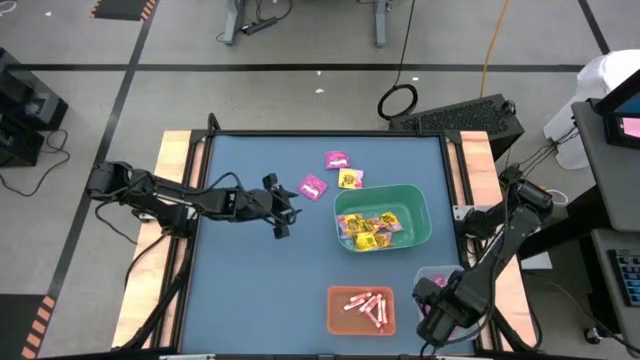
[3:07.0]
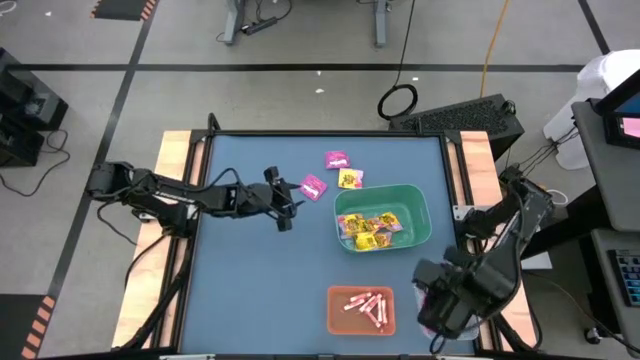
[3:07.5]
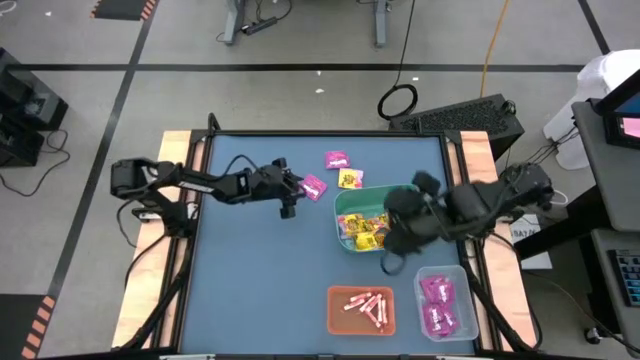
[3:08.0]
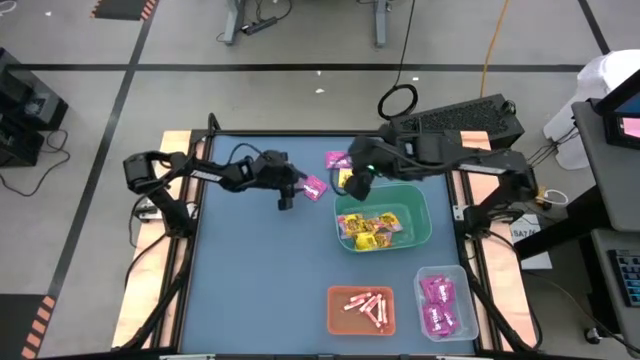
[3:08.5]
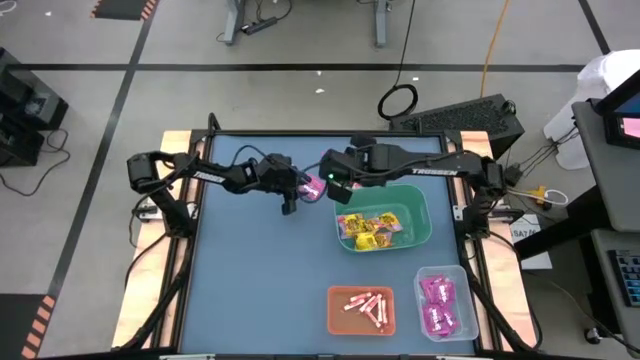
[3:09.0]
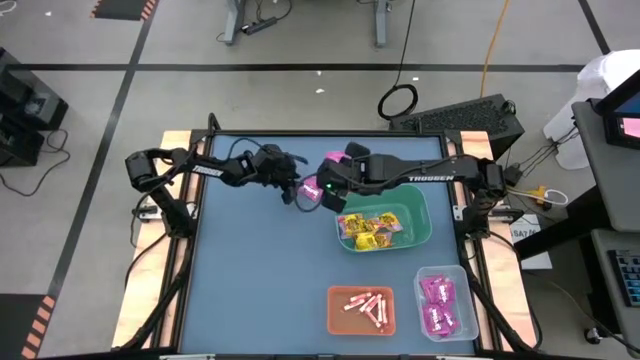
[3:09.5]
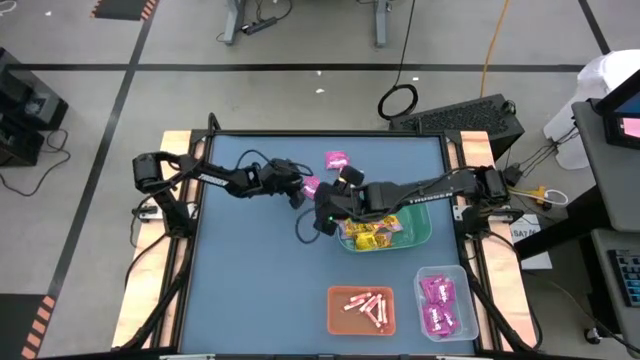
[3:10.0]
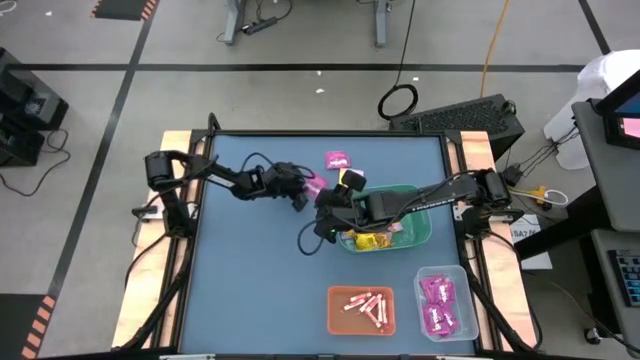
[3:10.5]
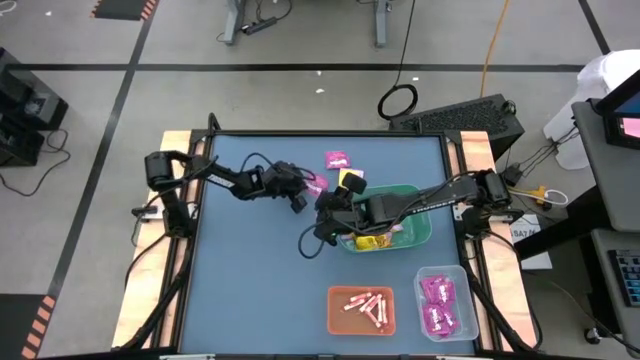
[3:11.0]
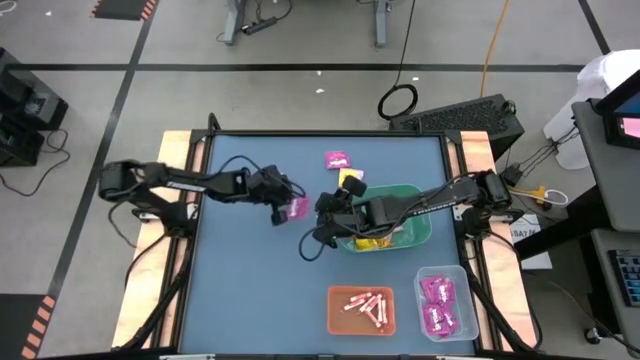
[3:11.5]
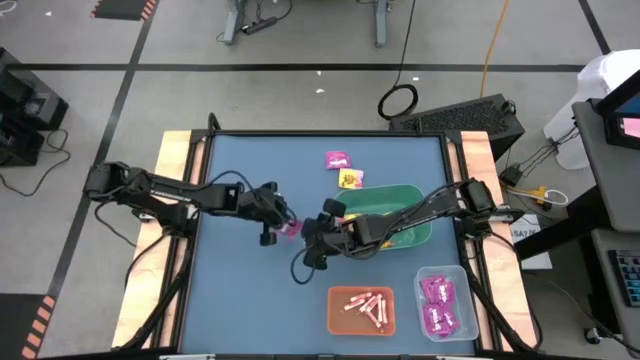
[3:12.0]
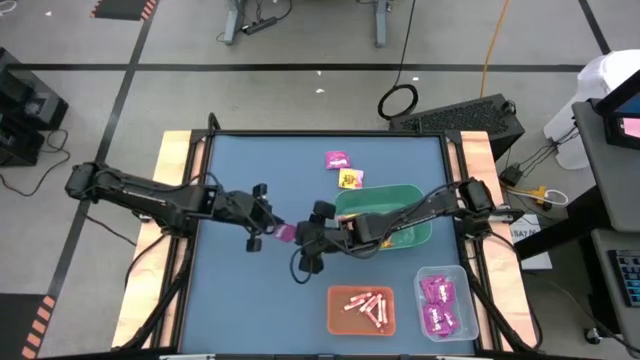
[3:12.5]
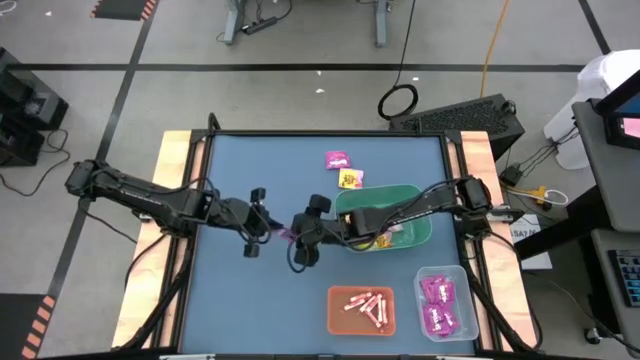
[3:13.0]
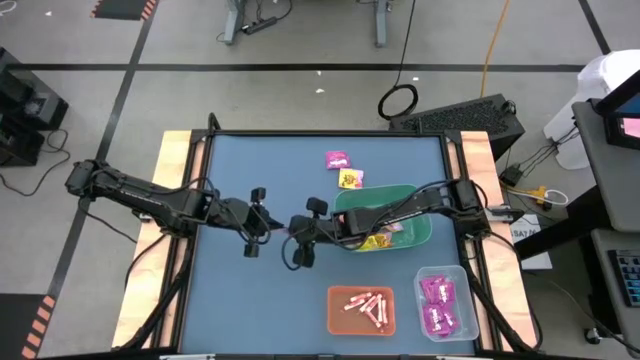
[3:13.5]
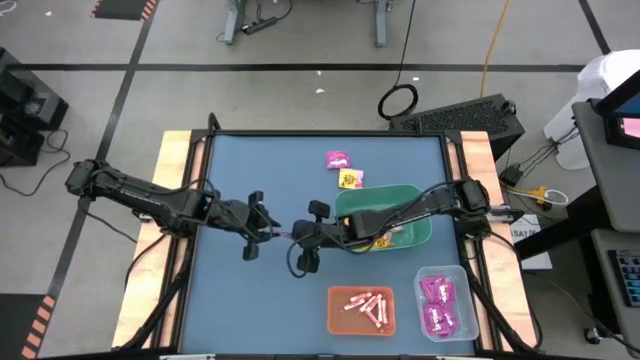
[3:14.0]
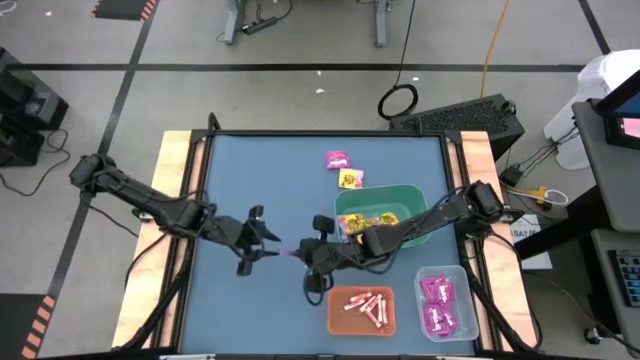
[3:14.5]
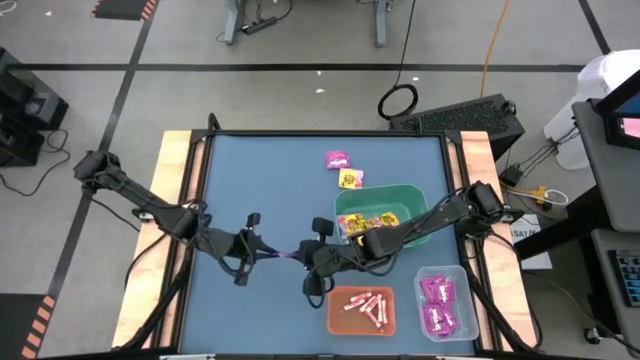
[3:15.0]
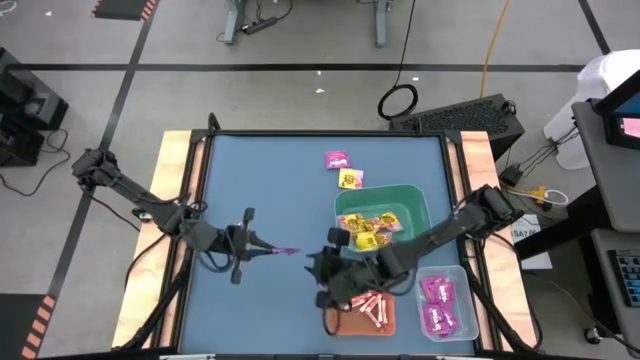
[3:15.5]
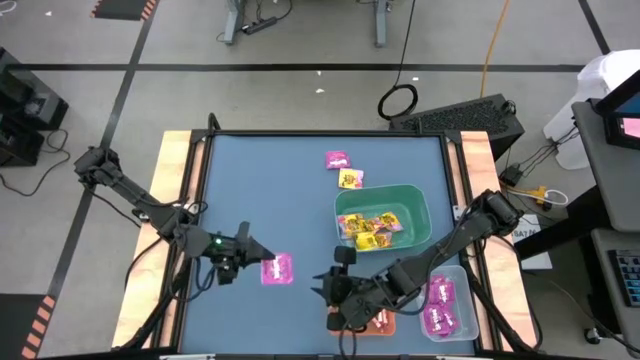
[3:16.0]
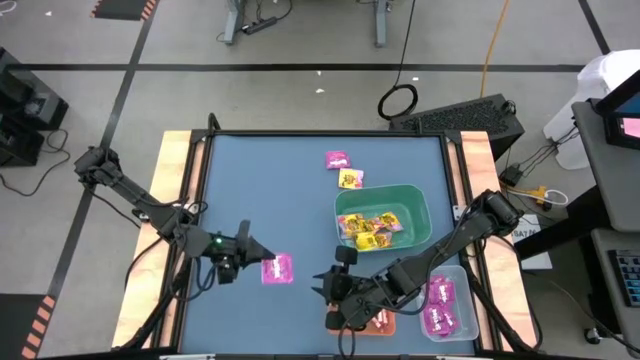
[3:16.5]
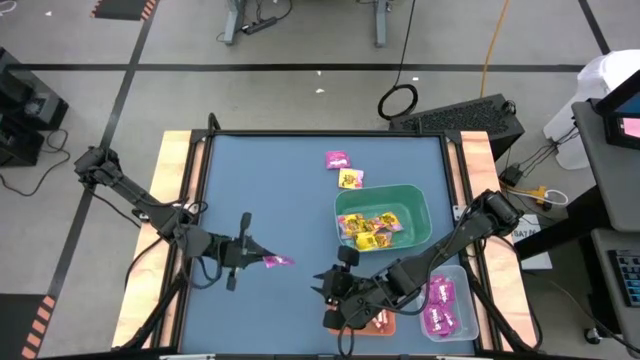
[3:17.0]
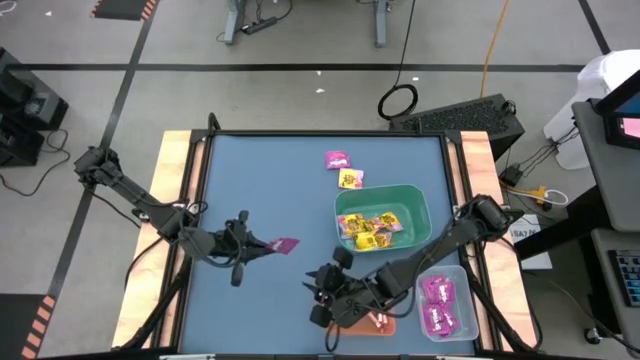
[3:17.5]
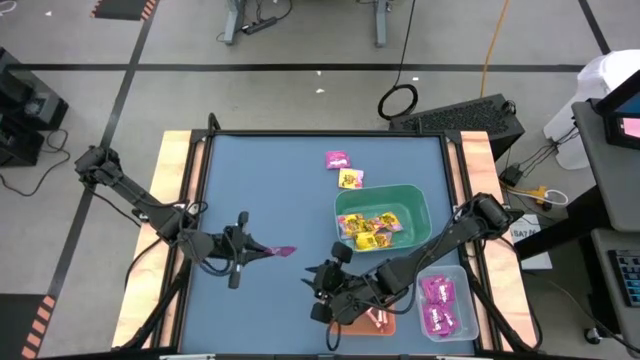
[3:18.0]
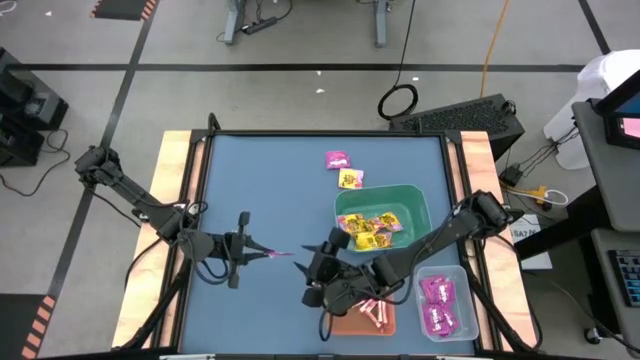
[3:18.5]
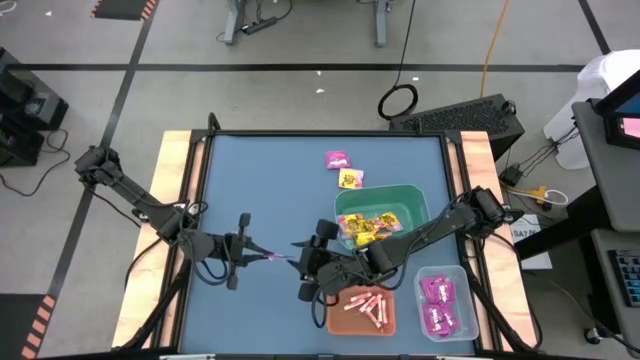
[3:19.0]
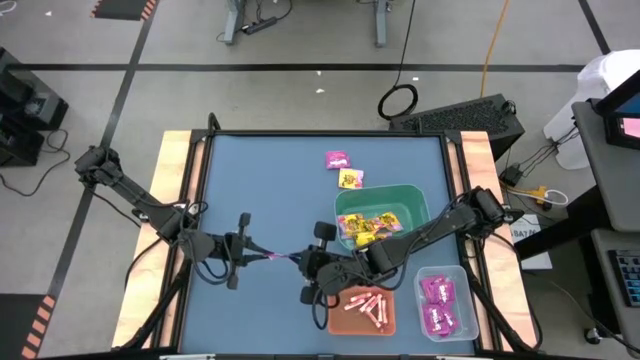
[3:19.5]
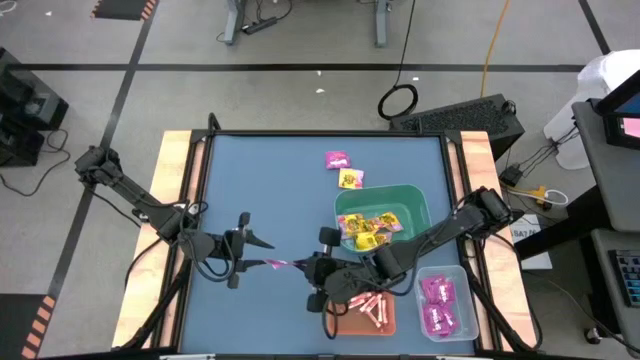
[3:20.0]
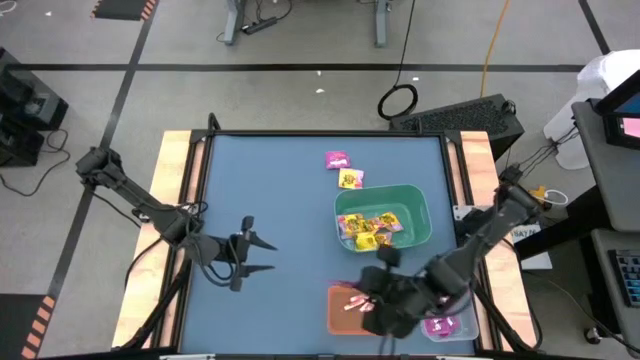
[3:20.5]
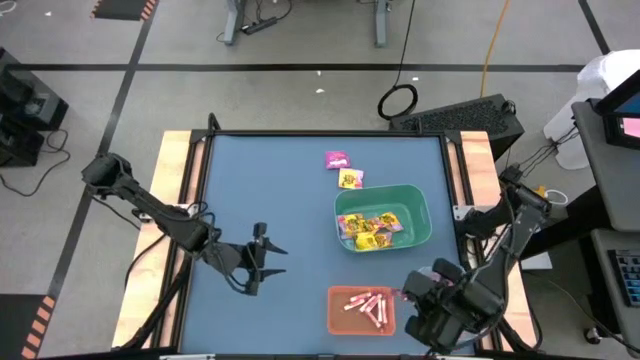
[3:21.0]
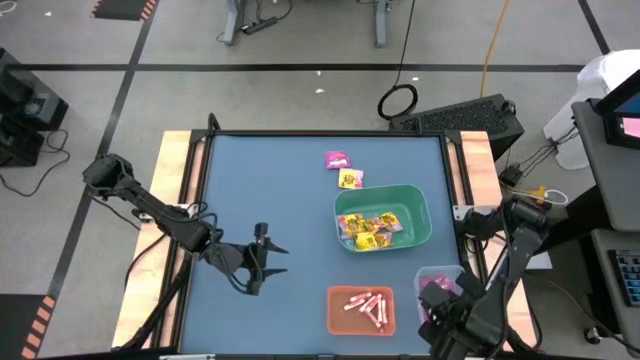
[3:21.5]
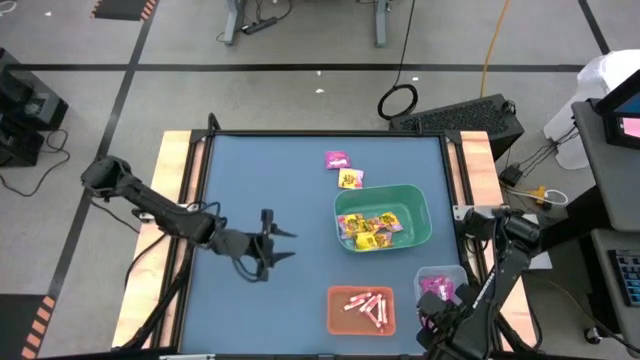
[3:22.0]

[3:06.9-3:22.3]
Task: Sort candy
Put the purple candy pack into the transparent bin

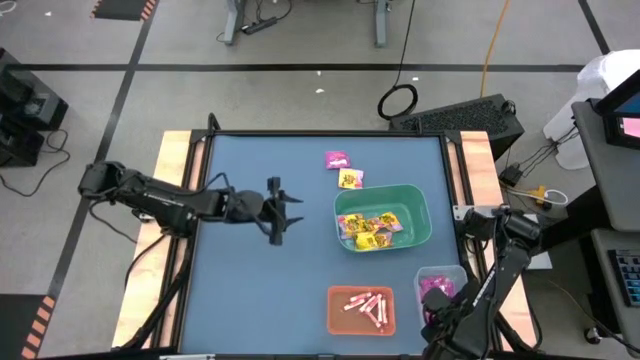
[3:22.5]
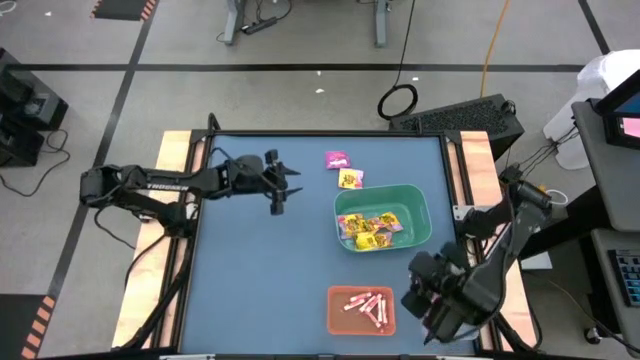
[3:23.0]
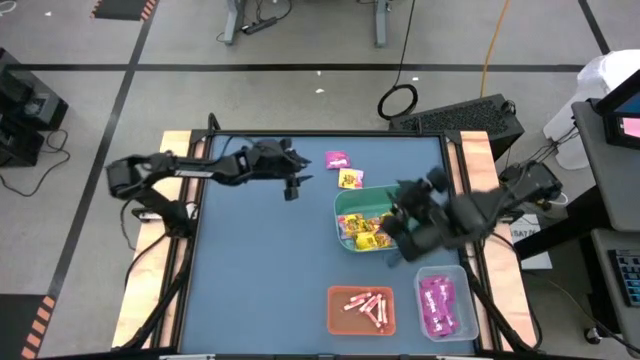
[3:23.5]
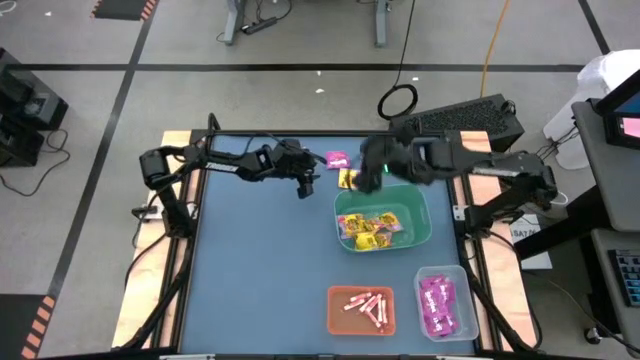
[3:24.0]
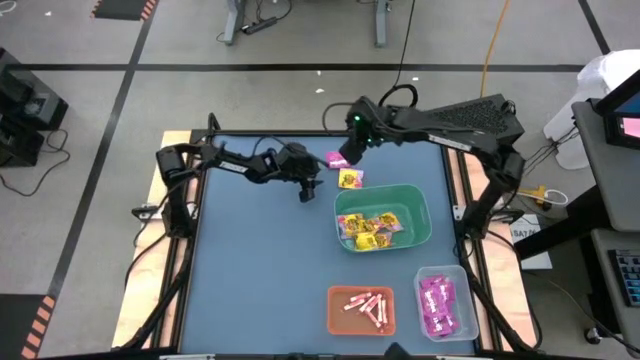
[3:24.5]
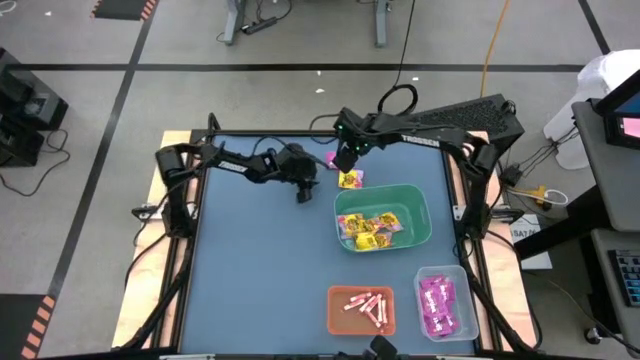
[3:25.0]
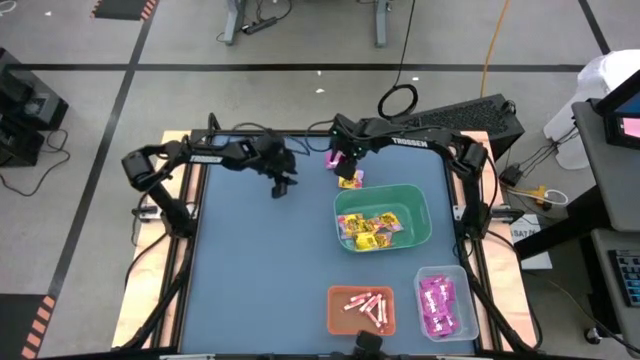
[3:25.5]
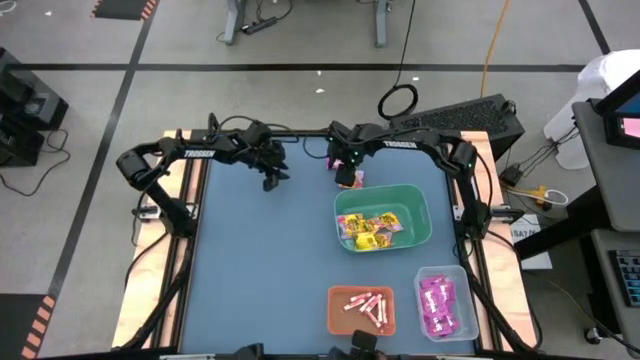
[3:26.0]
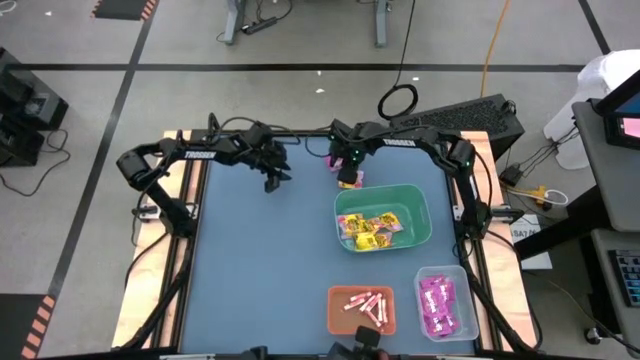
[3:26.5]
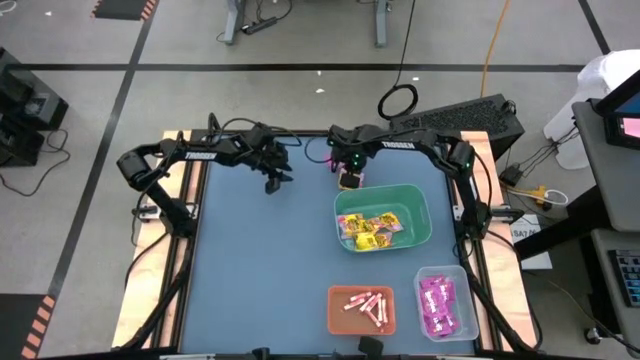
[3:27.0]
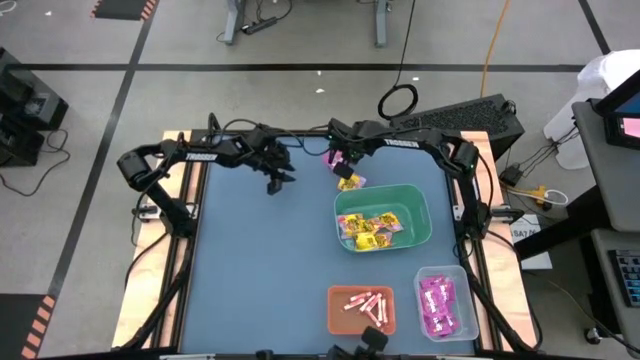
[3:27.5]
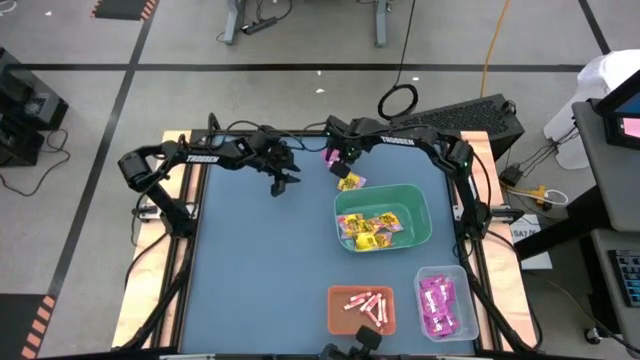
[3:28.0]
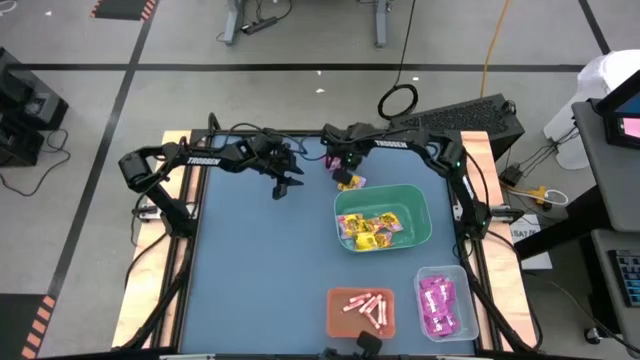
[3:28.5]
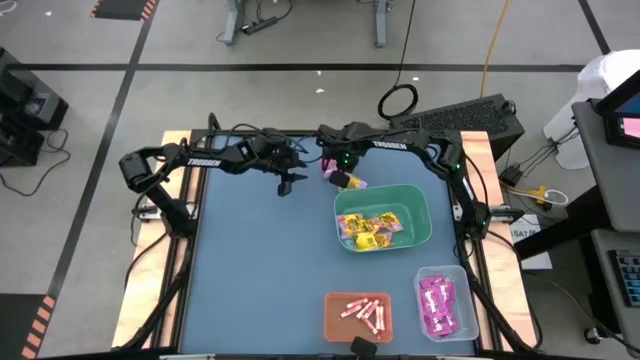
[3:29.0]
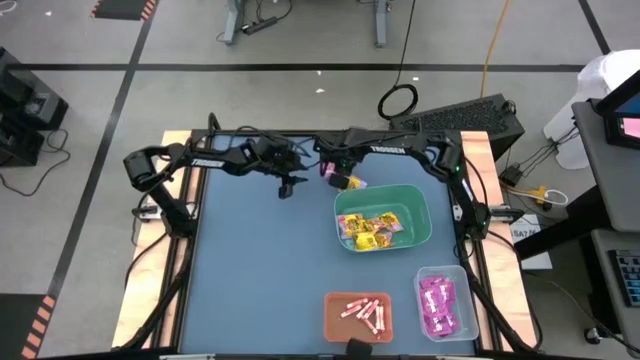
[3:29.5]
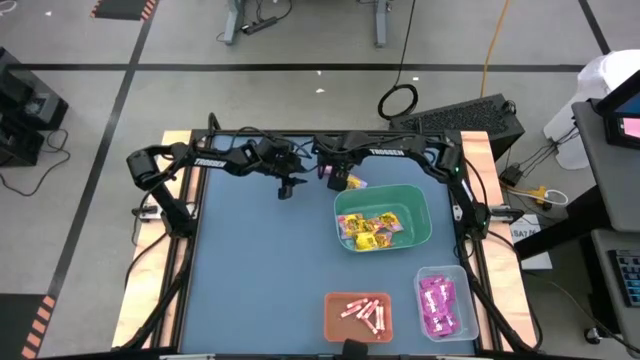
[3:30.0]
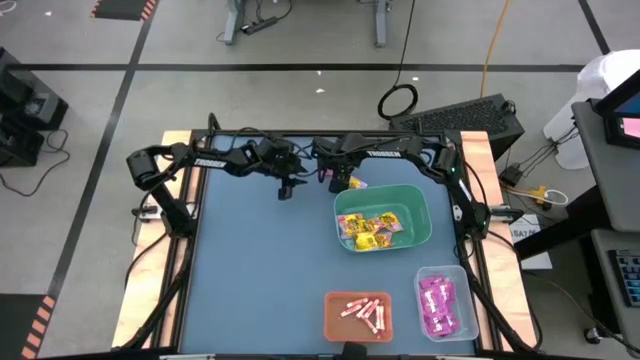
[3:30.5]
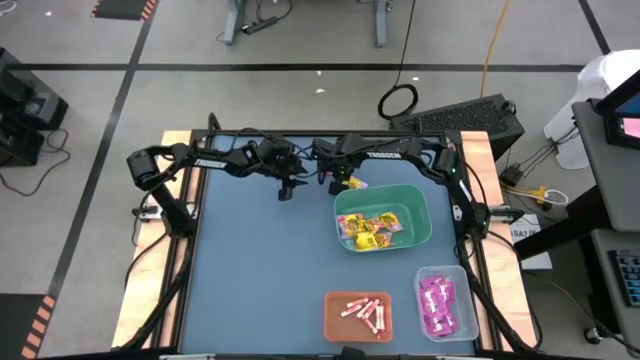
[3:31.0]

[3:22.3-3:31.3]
Put the purple candy pack into the transparent bin
